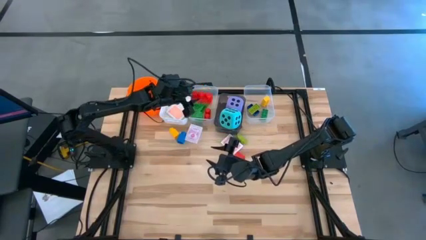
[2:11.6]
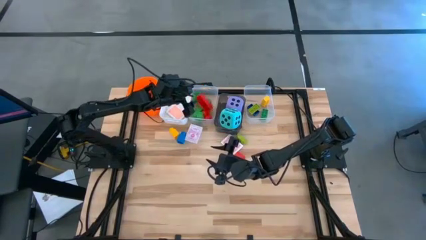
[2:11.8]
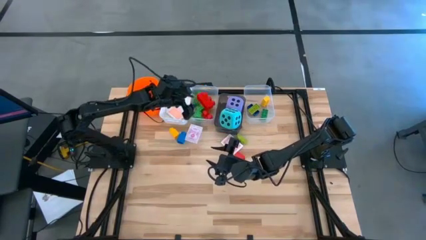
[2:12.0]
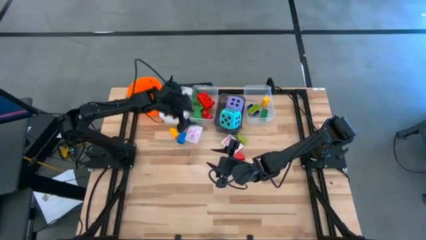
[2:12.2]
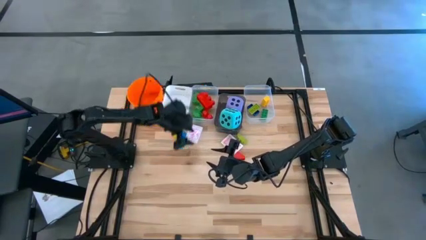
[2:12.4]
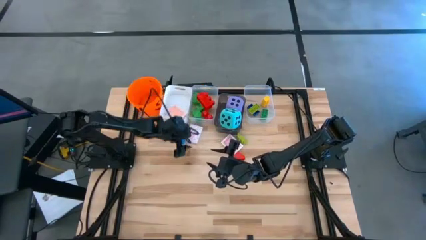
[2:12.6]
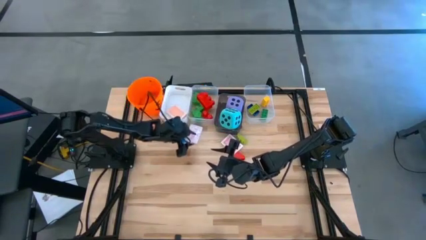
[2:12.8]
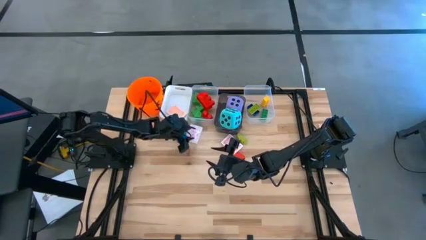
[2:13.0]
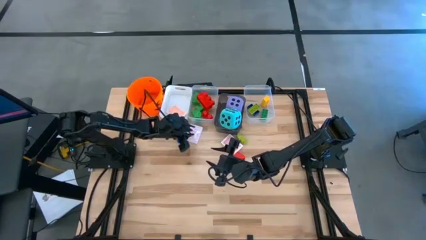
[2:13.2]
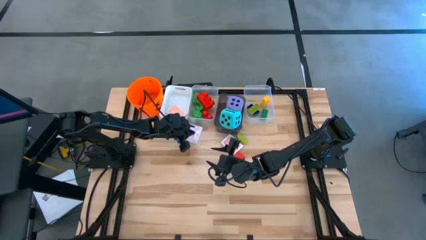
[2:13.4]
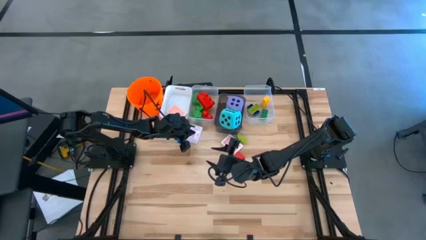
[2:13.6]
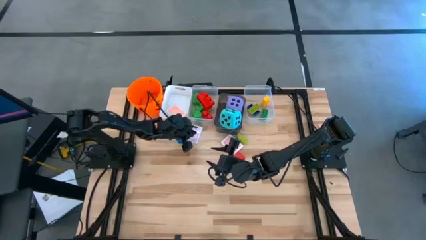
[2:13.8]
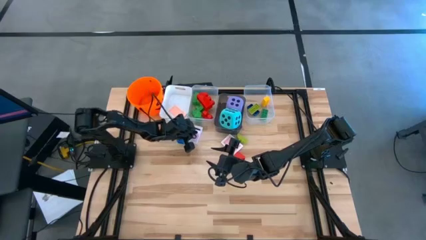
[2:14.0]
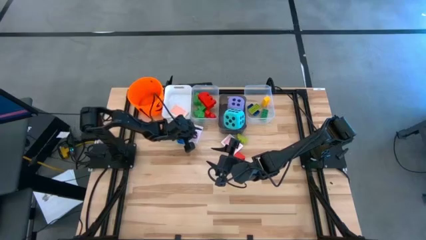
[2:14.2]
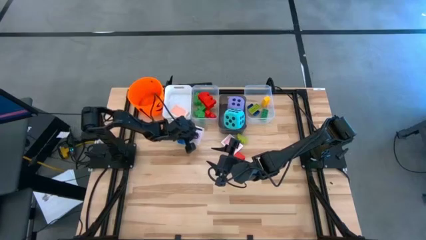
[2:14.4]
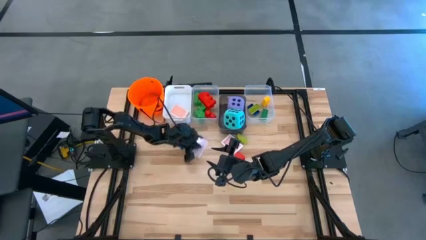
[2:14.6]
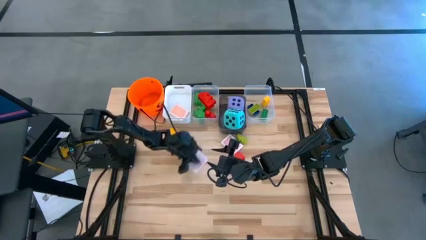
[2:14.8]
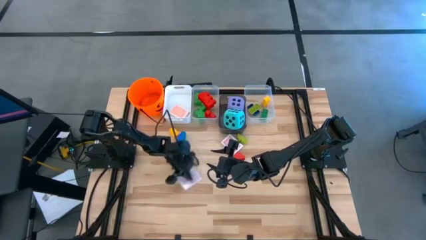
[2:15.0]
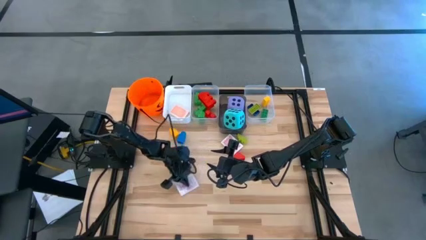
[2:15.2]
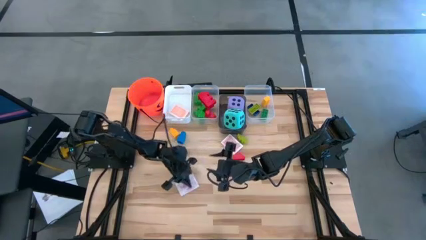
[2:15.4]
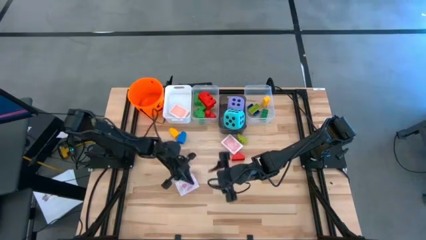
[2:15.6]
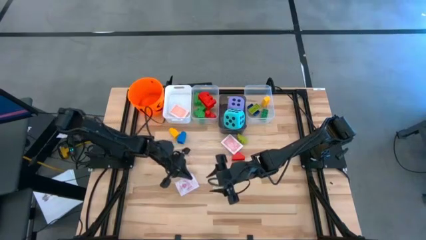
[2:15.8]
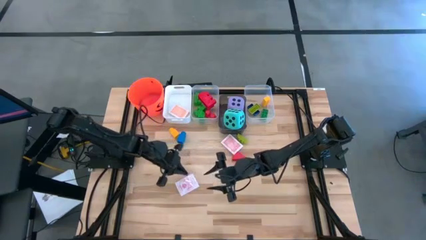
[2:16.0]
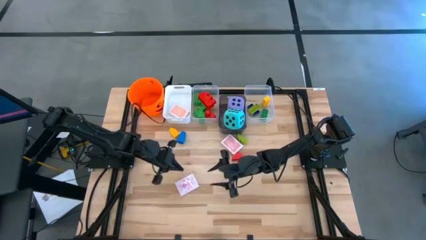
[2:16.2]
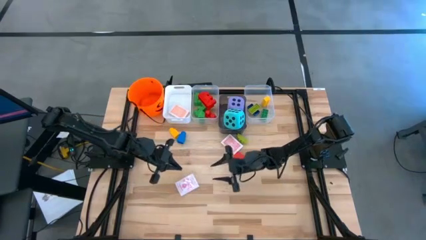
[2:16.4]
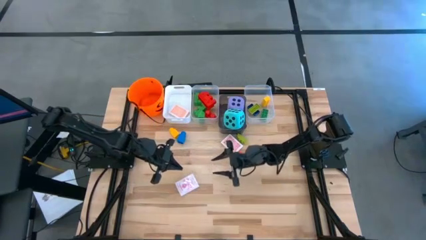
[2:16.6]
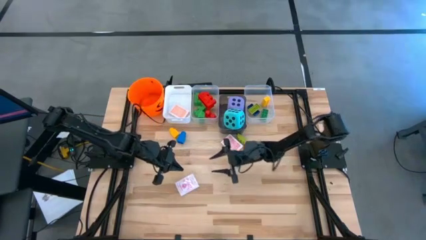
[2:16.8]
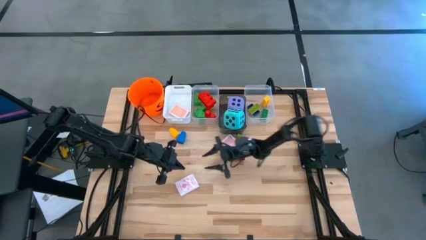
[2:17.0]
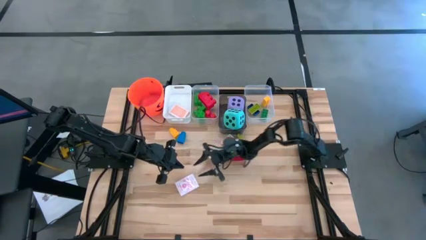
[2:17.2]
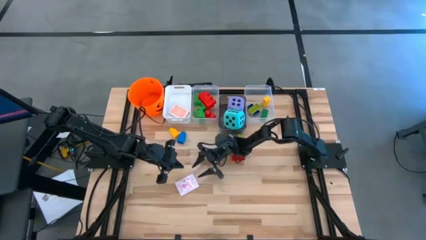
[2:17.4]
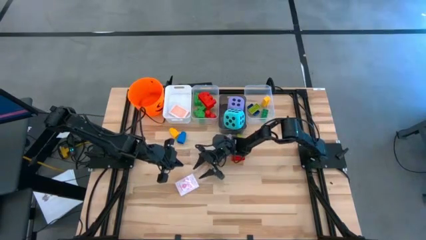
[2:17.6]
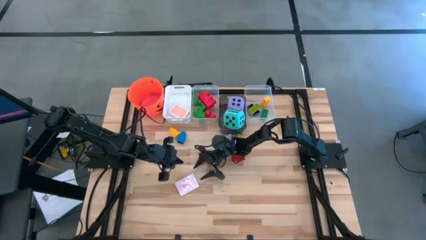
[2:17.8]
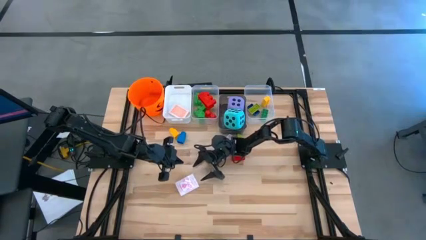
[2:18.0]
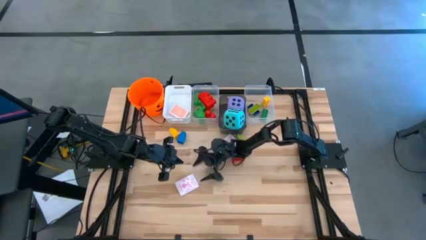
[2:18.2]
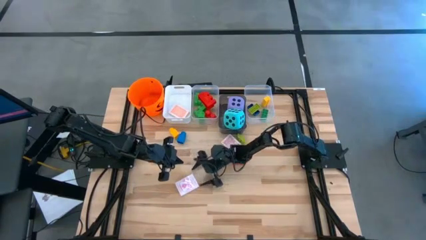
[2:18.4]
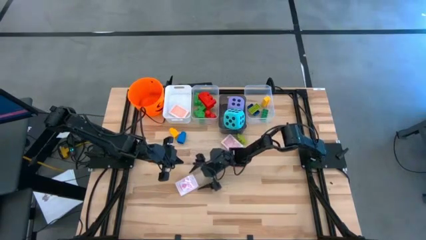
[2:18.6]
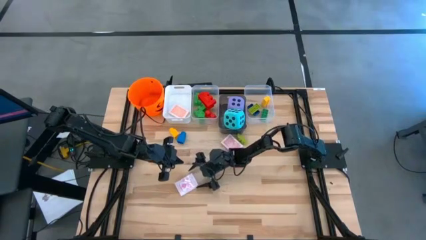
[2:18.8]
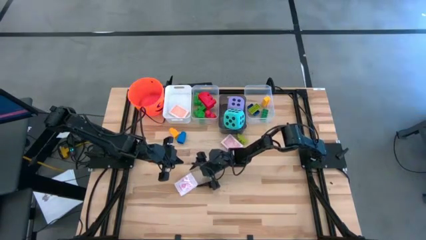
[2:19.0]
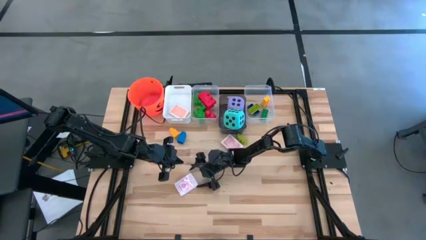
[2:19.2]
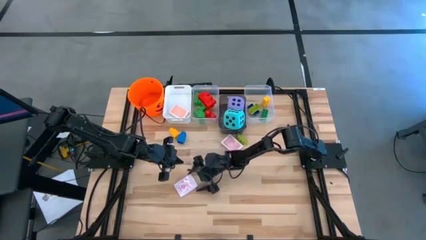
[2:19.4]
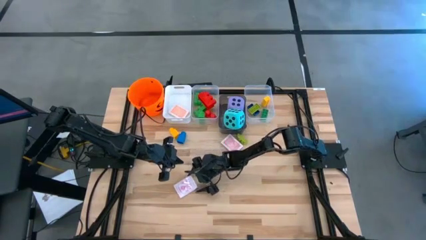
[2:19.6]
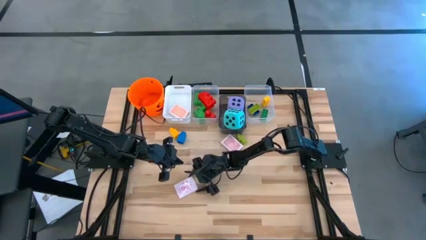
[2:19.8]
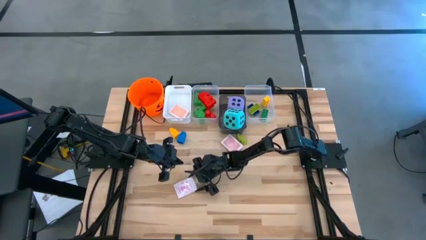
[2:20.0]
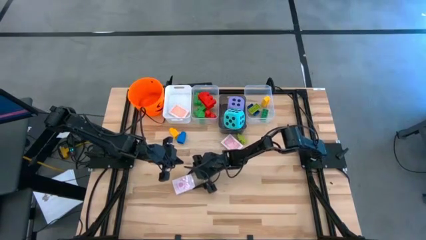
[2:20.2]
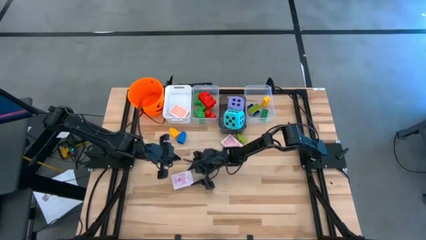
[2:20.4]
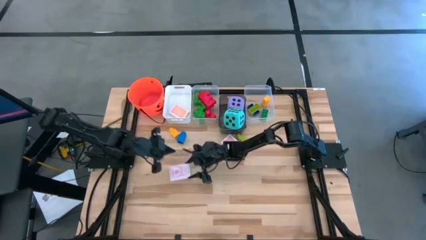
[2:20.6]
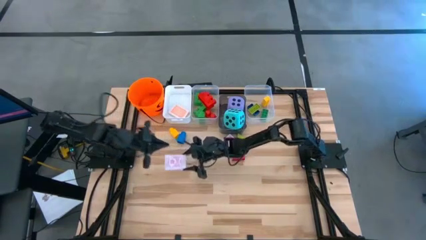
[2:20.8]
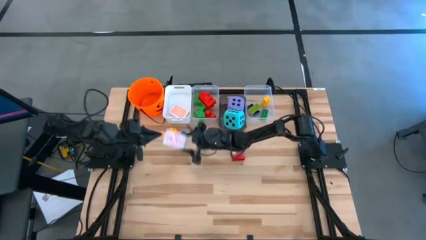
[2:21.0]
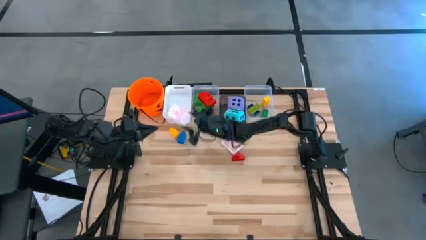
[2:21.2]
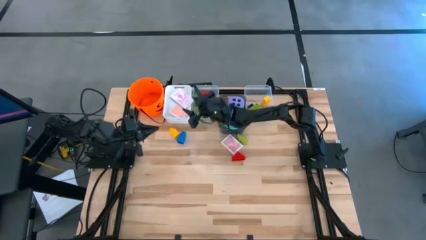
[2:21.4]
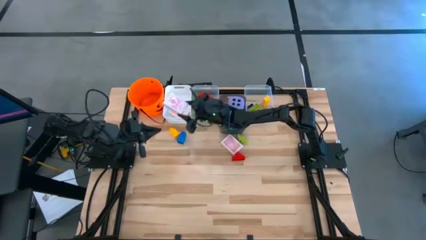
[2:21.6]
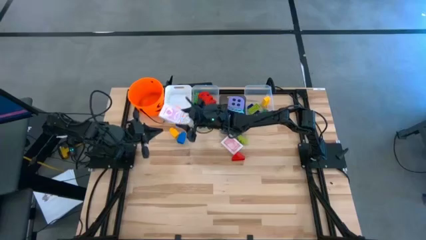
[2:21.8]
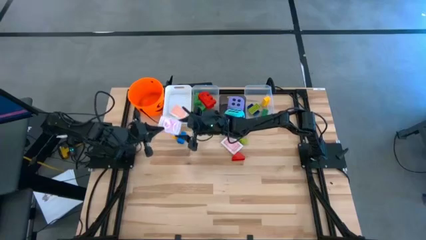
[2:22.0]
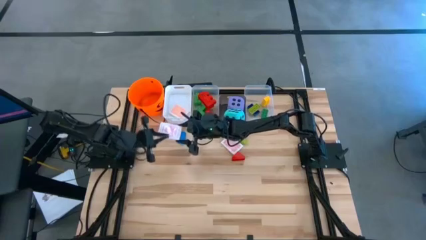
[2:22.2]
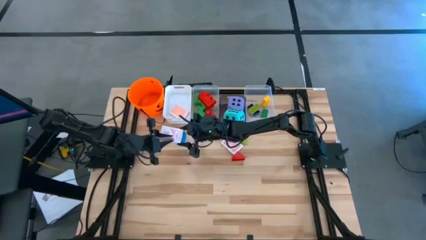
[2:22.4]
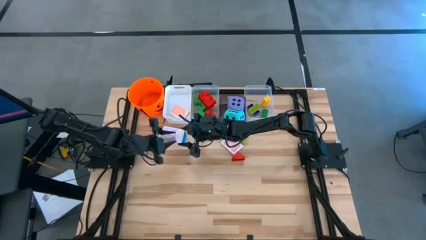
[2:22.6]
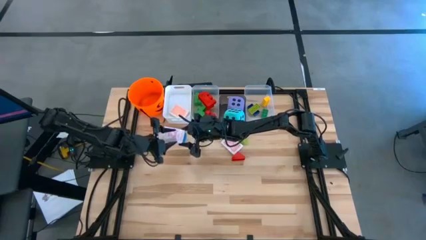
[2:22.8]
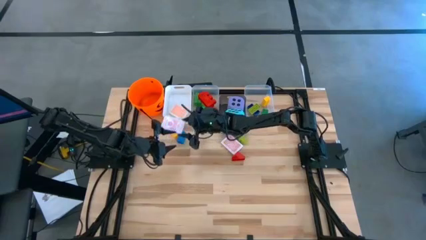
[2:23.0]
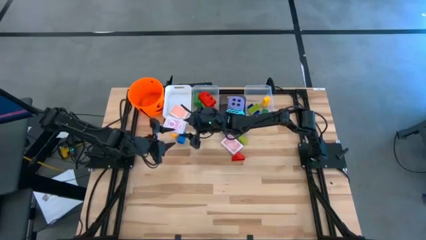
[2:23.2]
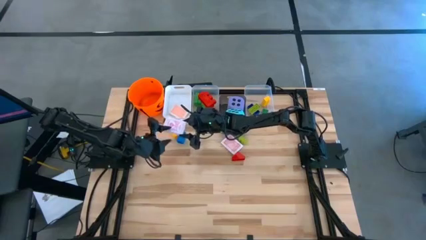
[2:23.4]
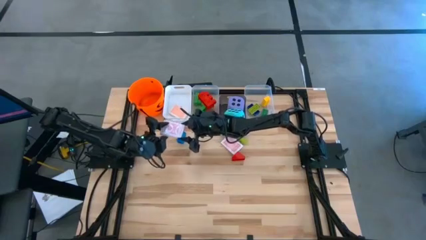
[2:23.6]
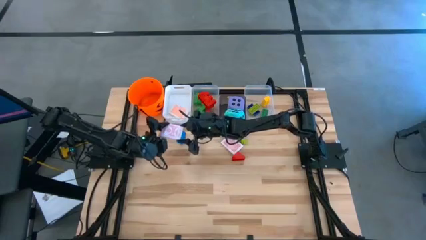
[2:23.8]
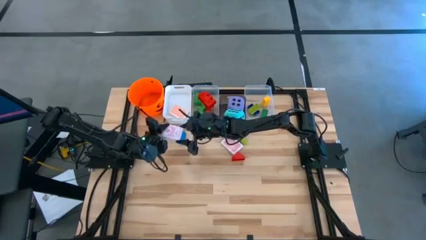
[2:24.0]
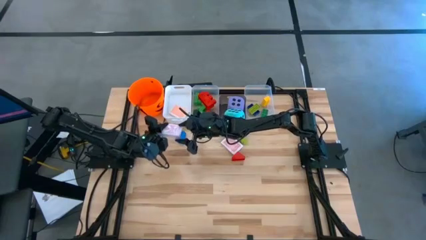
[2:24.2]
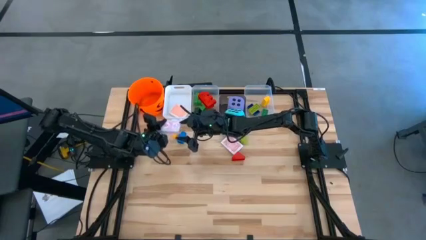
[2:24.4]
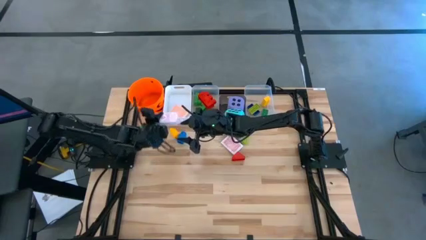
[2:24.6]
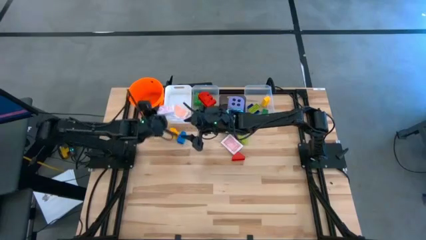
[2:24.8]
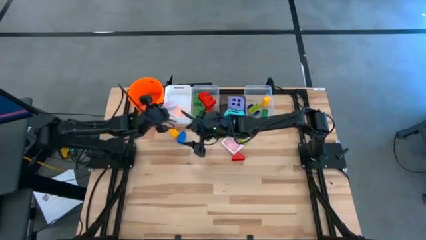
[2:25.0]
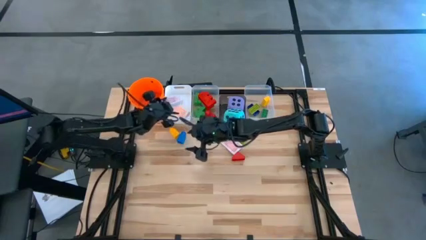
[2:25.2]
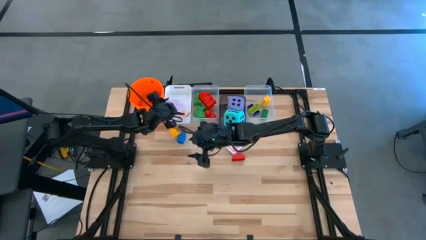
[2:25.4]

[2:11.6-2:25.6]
Task: Pick & Place Toys
Put the pink playing card box into the white bin

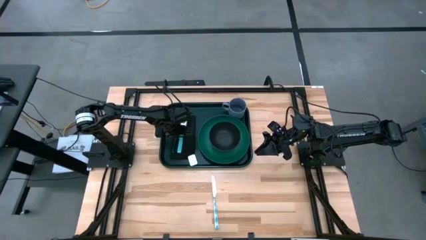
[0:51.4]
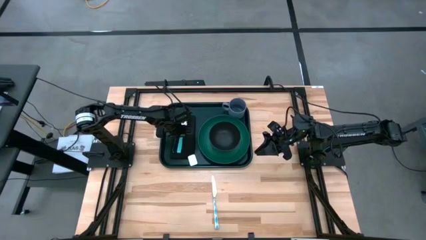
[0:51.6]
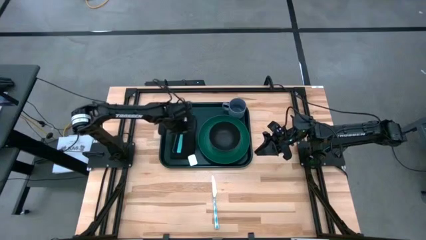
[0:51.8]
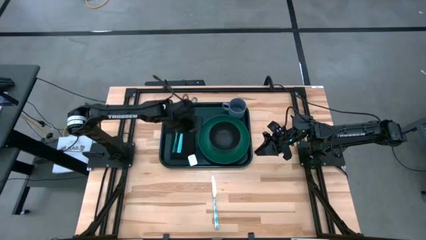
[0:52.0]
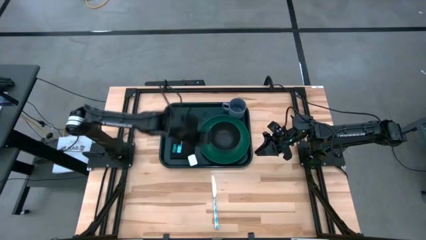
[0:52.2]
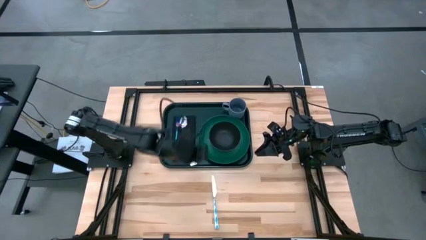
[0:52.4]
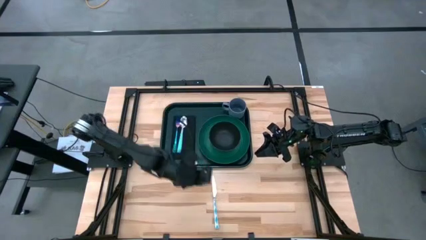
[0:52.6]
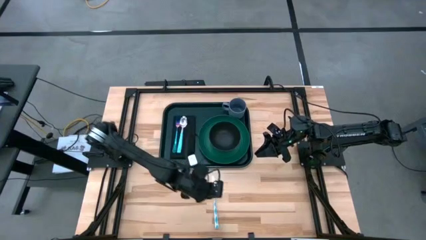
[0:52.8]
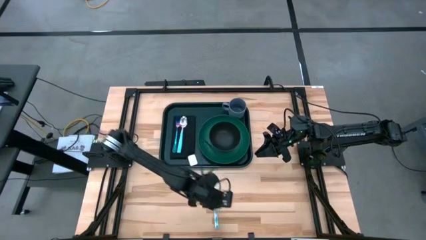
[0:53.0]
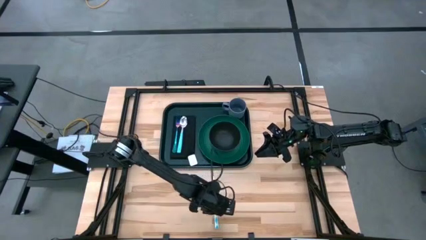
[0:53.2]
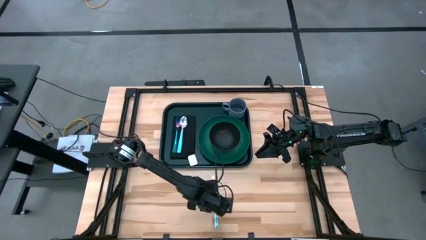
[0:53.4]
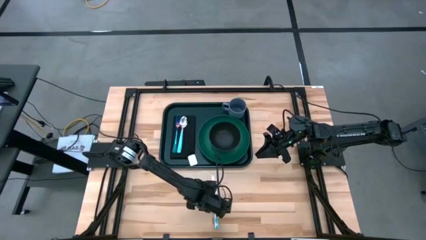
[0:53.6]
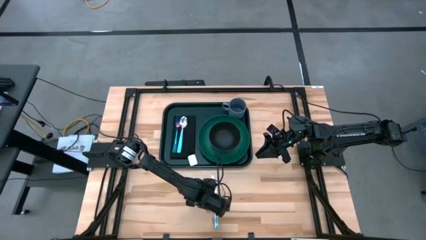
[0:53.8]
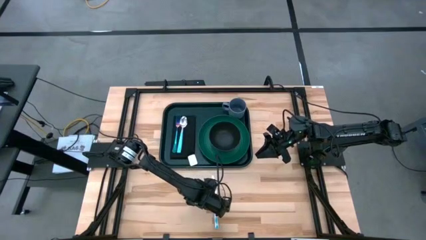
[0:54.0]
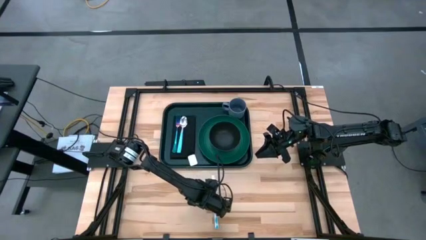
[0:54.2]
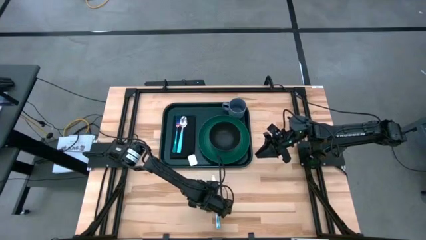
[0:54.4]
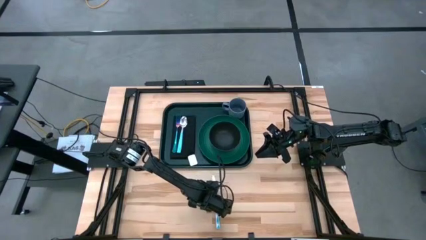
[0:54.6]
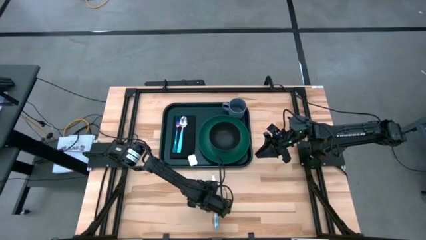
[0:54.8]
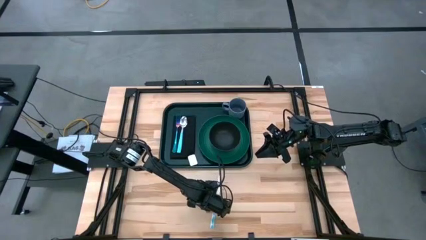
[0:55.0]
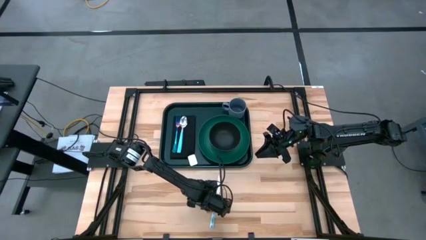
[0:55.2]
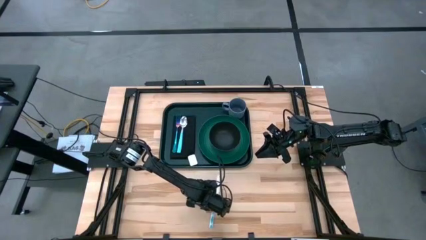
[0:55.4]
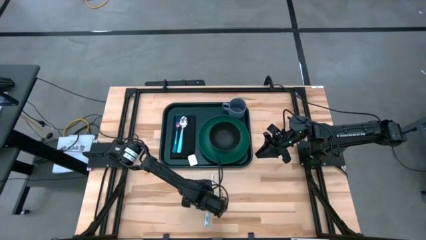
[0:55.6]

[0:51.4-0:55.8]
Task: Set up tray
Put the blue knife on the black napkin to the right of the blue spoon
